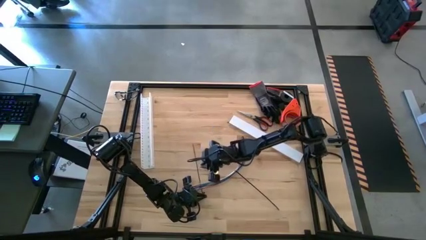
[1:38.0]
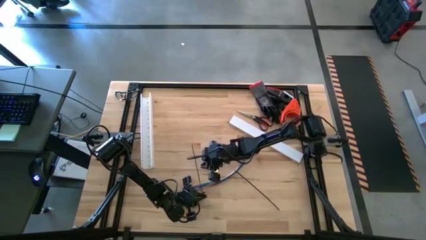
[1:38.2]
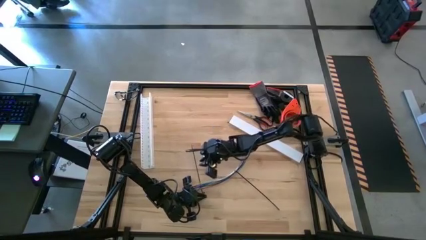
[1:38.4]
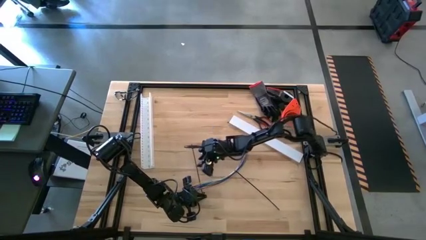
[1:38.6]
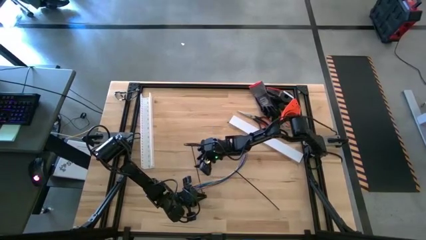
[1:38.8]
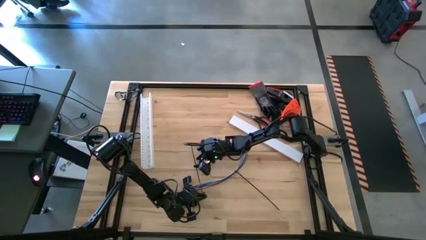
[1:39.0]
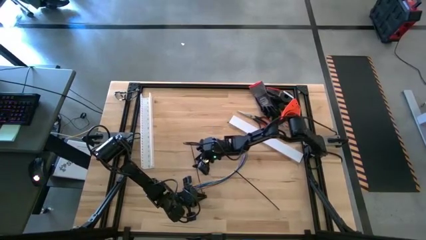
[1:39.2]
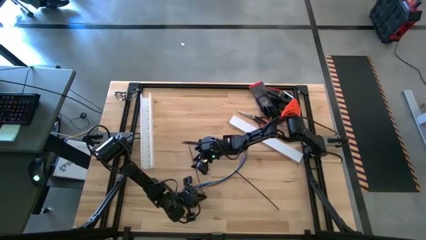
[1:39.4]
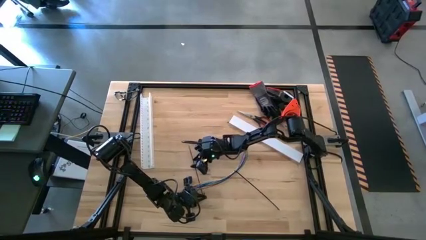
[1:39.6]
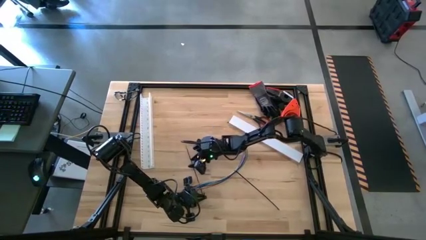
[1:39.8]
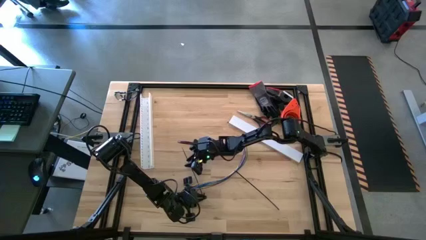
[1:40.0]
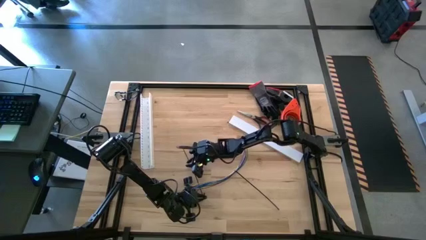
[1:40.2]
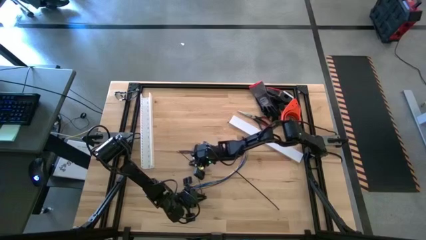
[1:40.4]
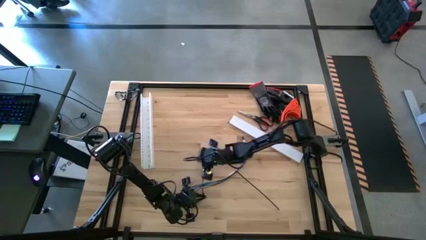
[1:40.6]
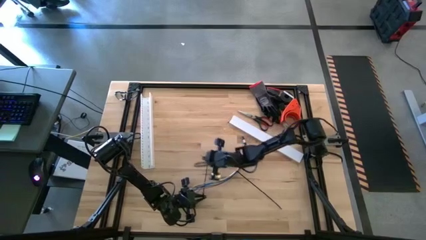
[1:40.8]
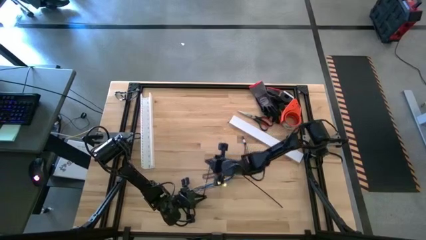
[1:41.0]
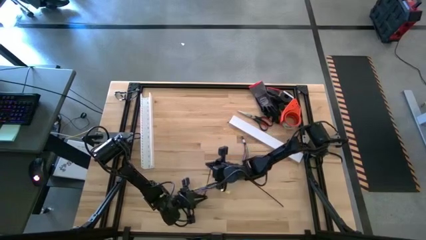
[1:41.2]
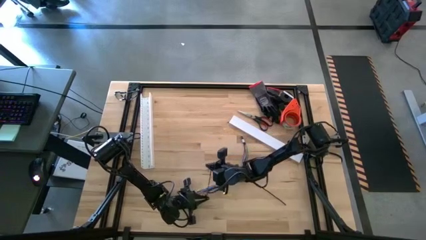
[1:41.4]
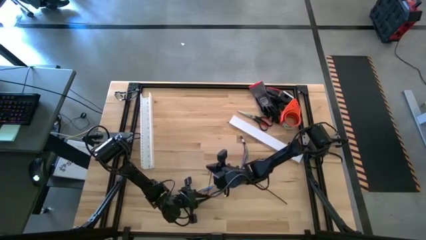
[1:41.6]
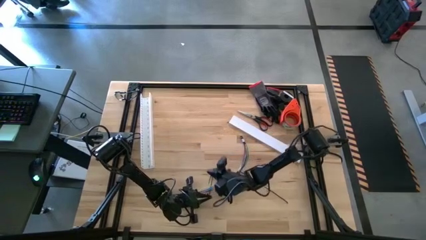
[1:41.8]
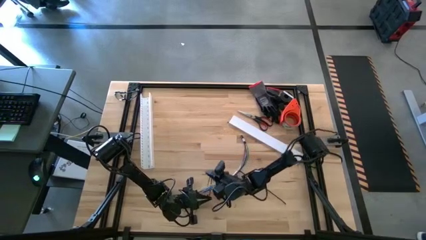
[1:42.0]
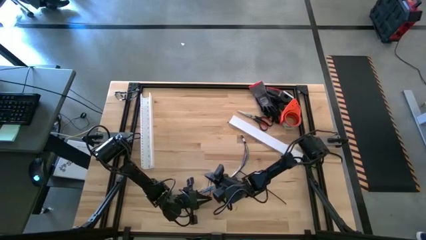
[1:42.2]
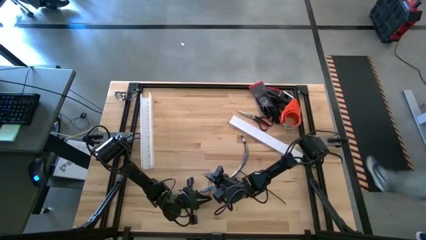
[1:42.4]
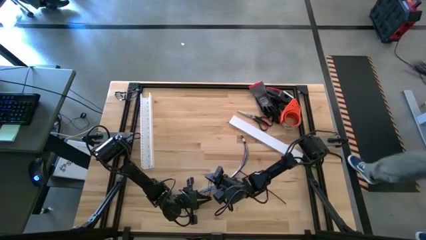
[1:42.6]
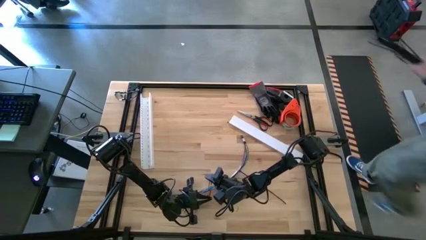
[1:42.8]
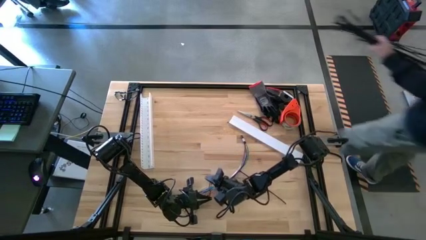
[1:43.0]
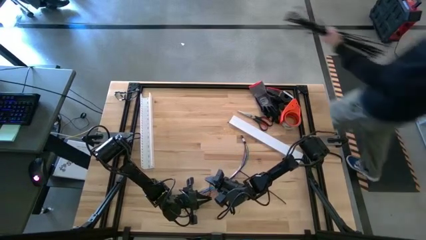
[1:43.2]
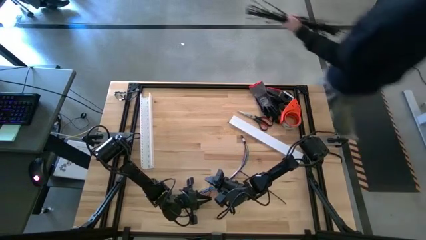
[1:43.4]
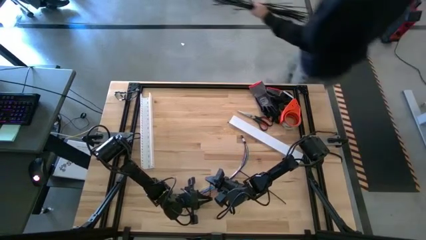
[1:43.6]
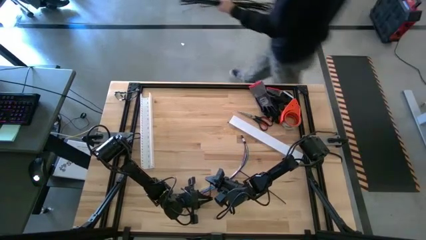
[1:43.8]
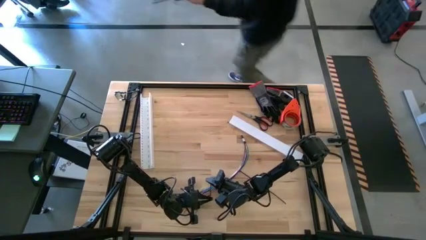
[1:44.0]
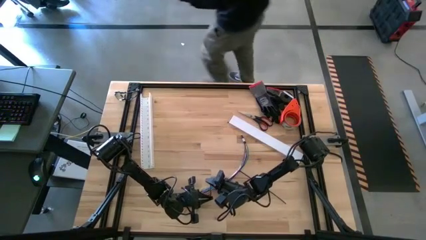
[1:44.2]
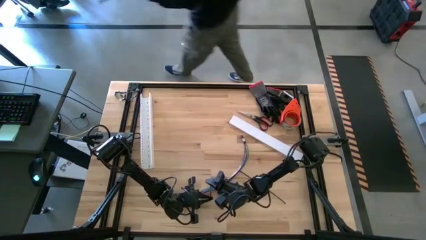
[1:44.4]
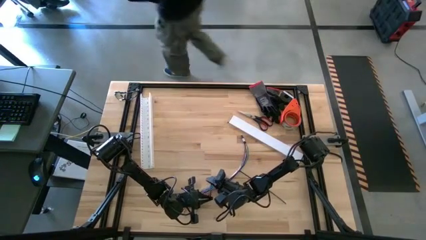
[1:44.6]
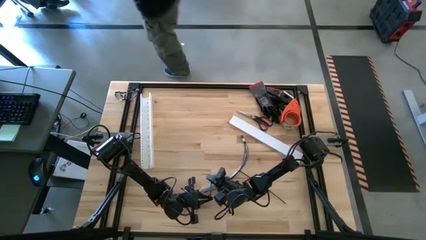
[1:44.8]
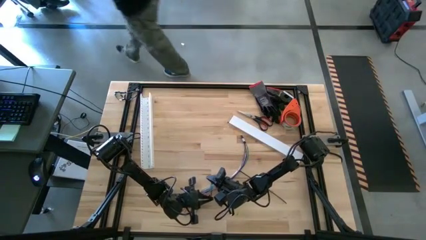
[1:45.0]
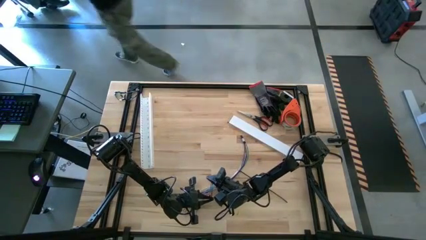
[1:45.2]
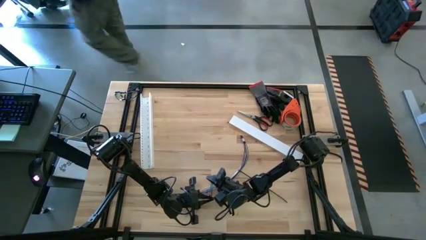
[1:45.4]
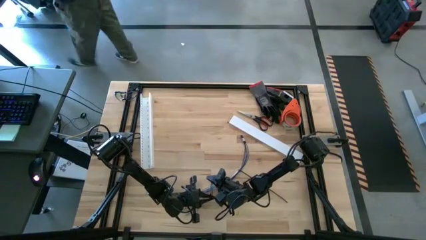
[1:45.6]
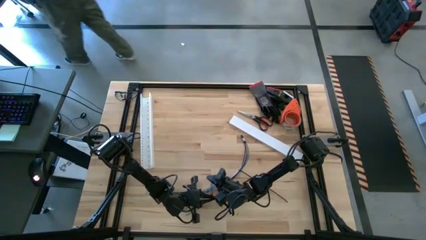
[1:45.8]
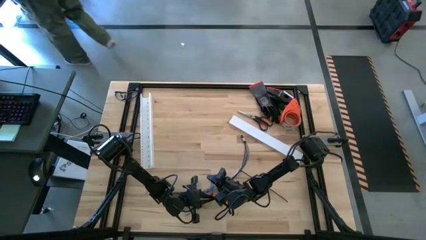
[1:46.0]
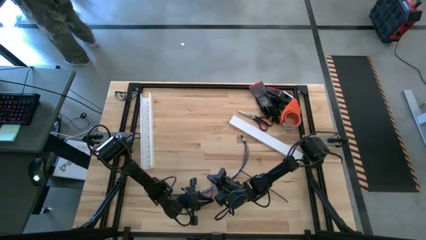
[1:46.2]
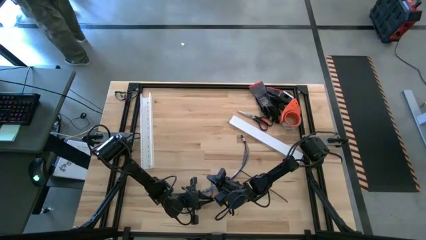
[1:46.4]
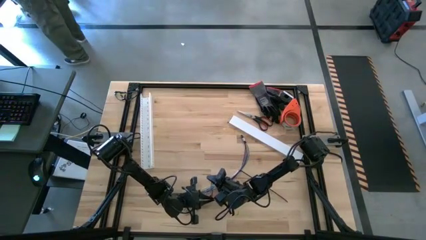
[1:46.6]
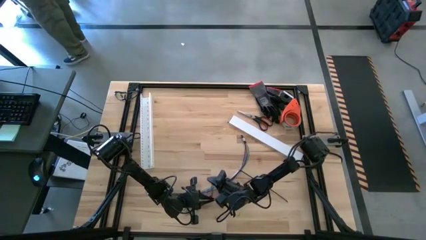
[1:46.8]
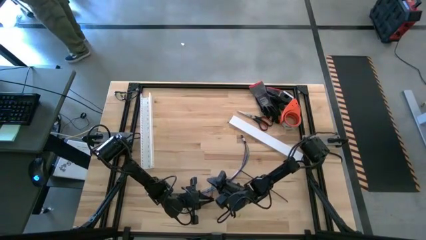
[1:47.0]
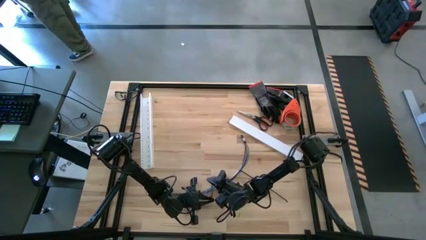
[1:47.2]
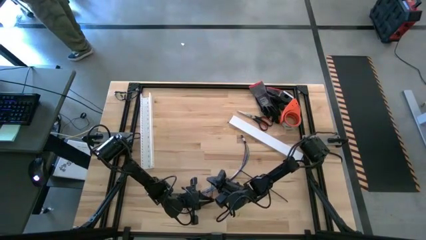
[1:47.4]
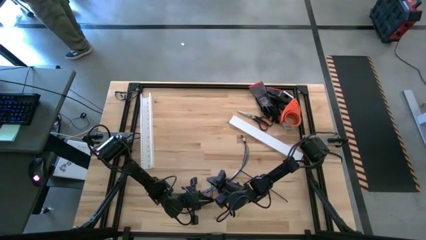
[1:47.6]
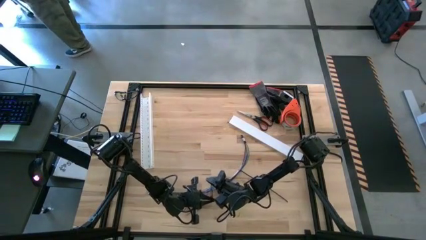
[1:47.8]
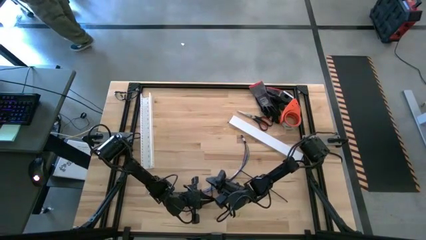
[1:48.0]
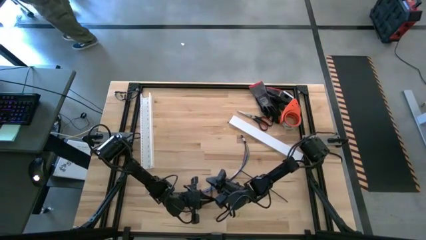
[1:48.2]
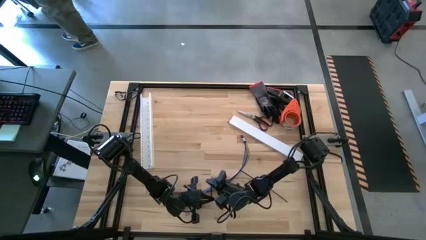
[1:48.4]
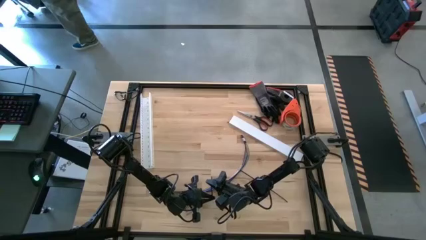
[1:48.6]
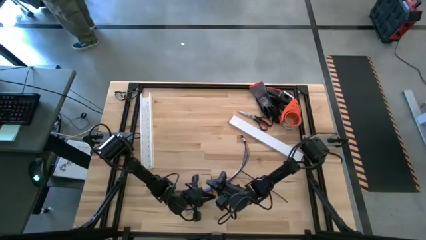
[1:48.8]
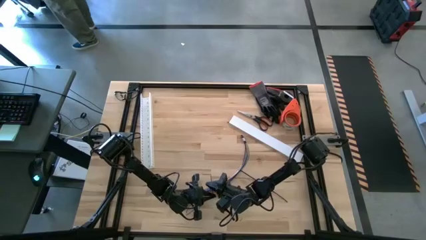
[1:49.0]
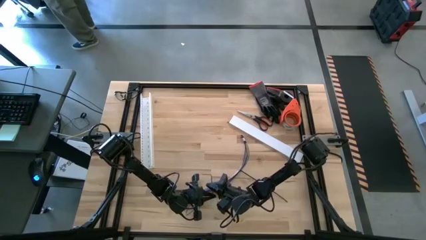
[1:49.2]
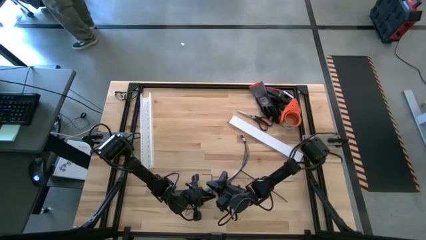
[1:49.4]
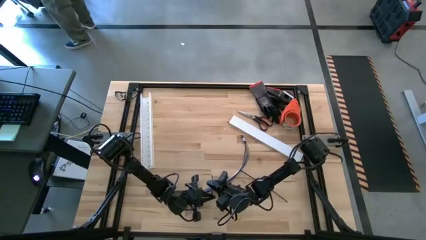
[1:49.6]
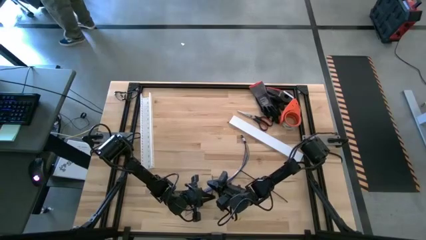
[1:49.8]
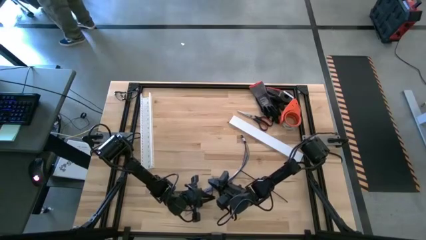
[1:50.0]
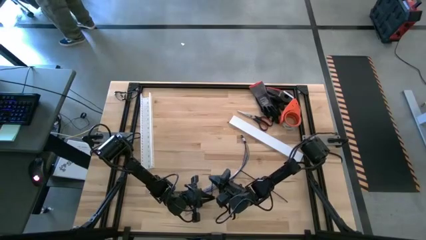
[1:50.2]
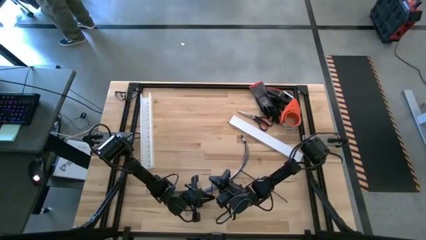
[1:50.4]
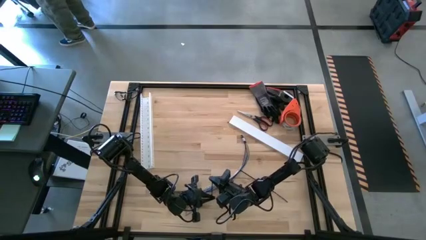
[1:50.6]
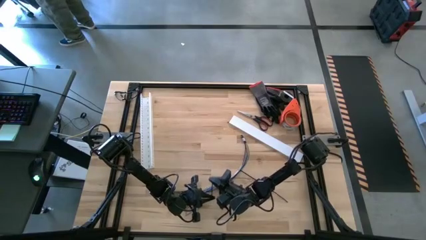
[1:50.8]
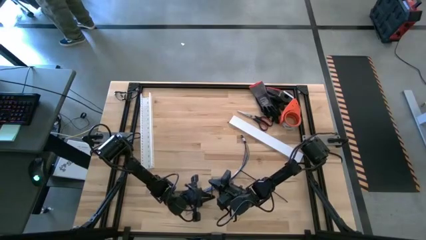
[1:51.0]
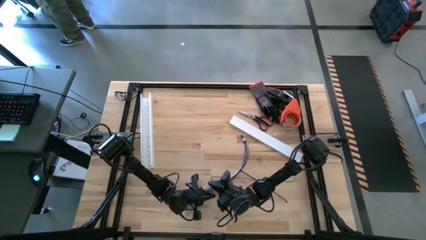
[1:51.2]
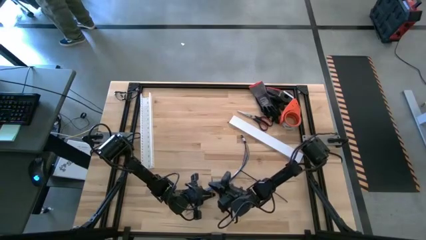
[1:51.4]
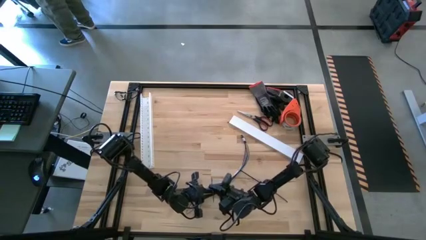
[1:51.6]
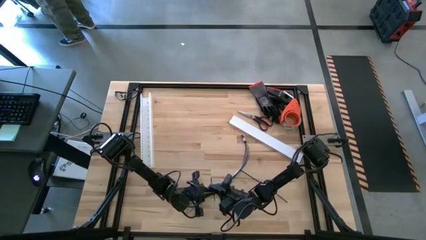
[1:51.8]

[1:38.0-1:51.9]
Task: Ziptie cables
Wrap the zip tie on the cable
